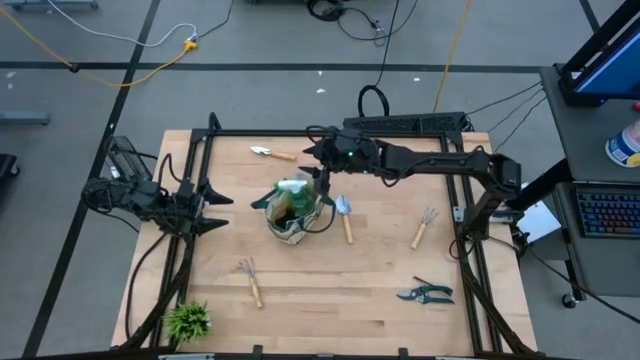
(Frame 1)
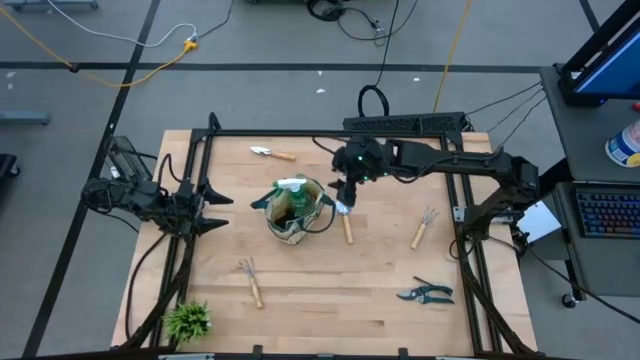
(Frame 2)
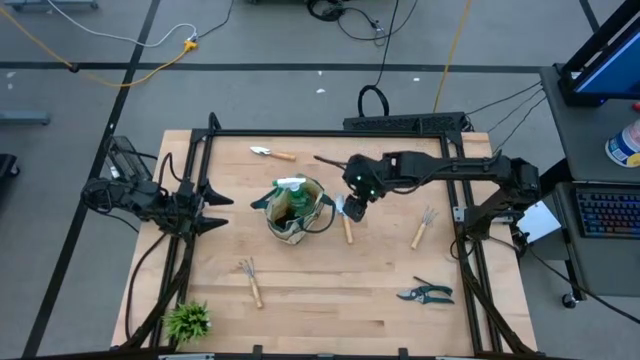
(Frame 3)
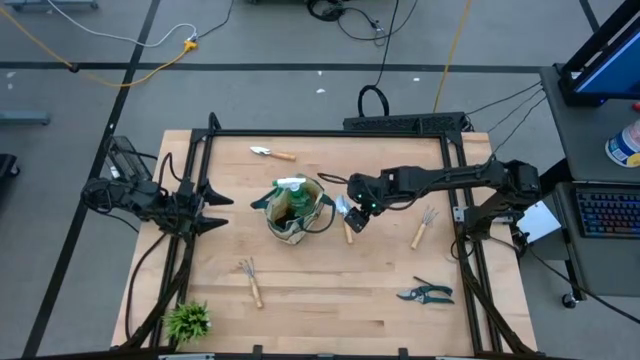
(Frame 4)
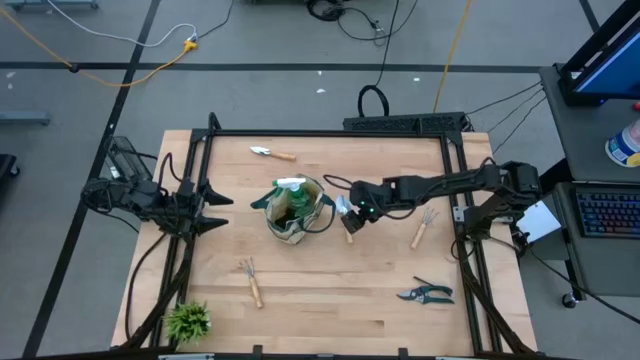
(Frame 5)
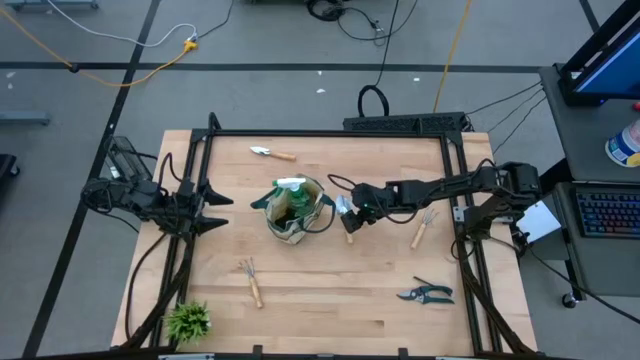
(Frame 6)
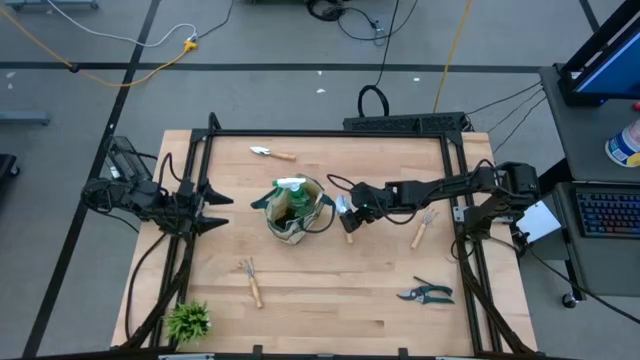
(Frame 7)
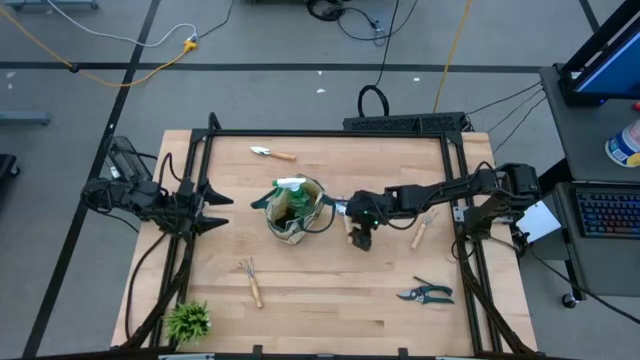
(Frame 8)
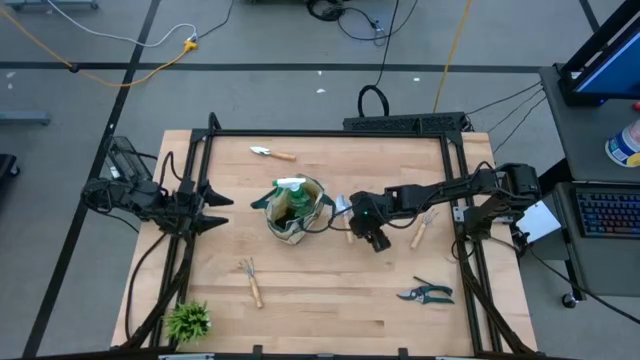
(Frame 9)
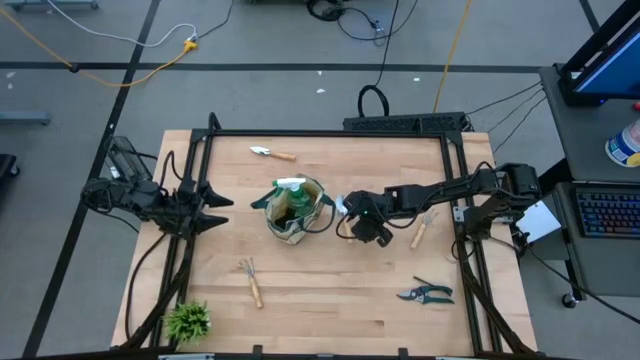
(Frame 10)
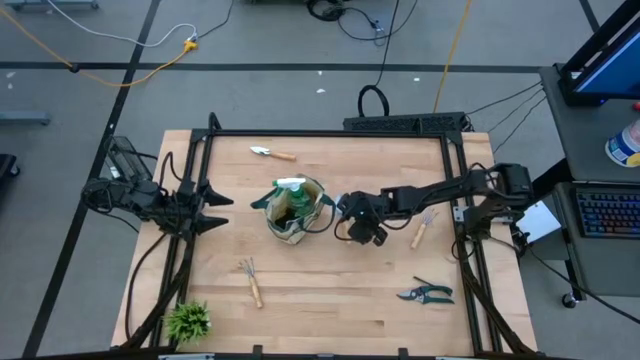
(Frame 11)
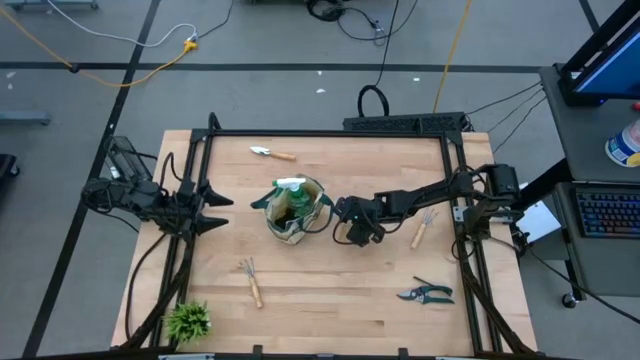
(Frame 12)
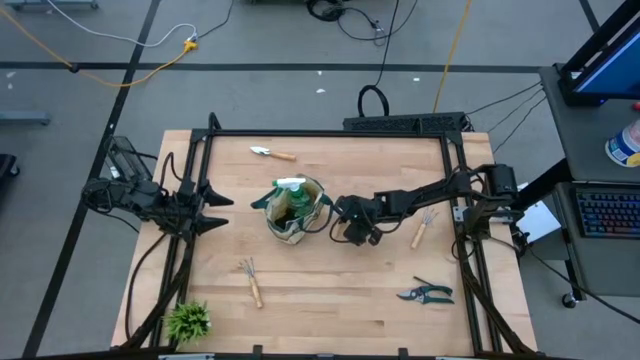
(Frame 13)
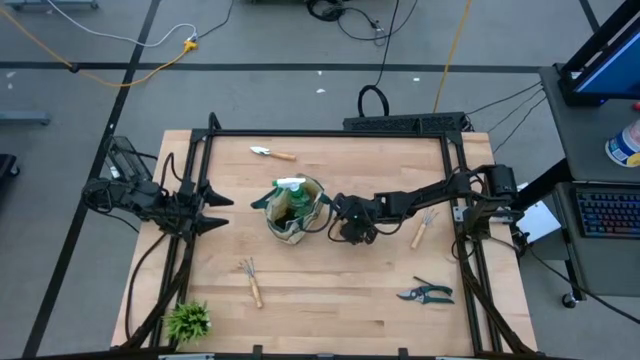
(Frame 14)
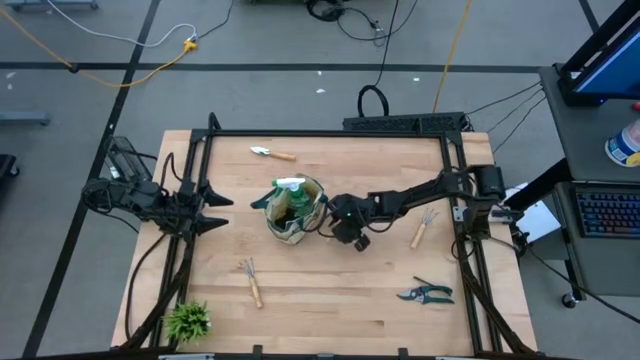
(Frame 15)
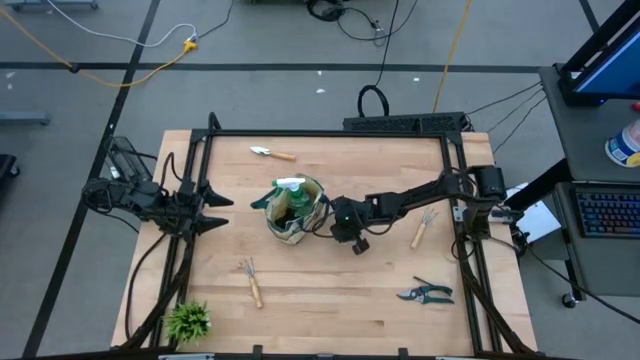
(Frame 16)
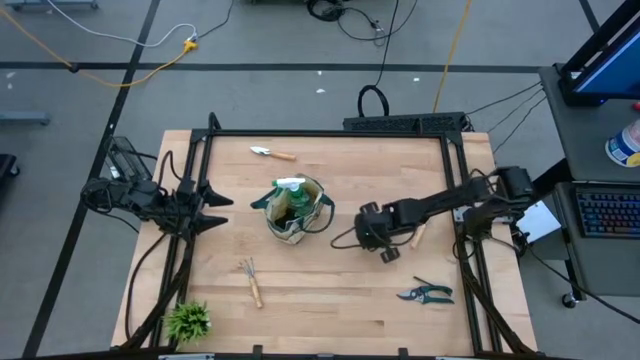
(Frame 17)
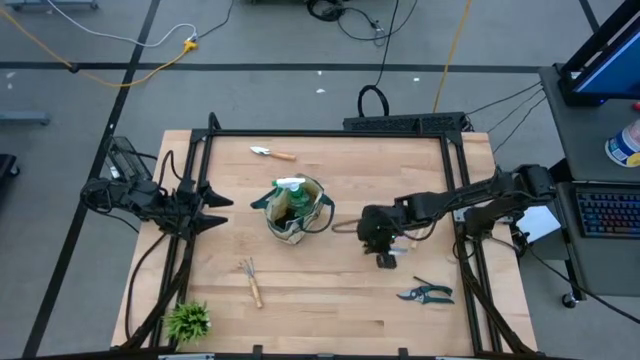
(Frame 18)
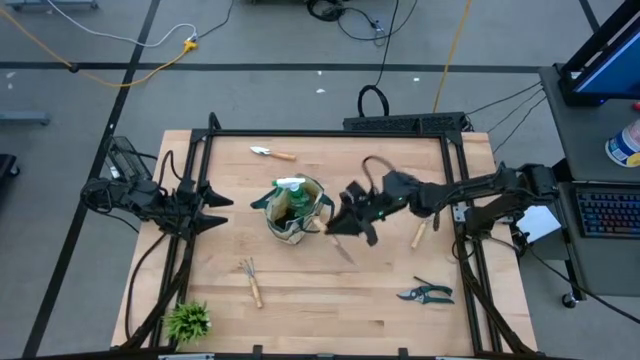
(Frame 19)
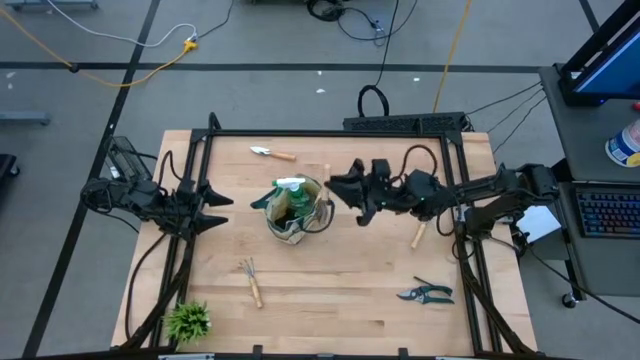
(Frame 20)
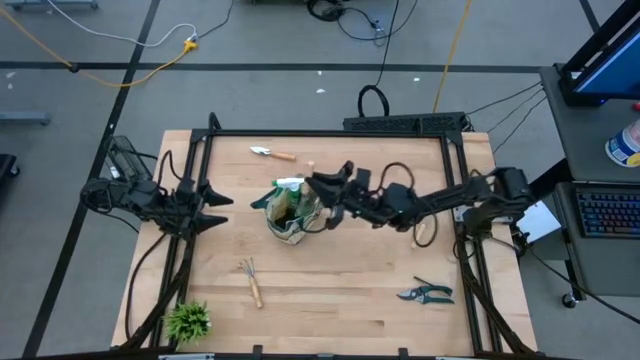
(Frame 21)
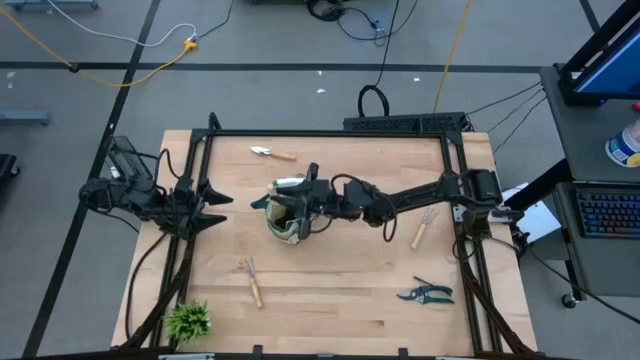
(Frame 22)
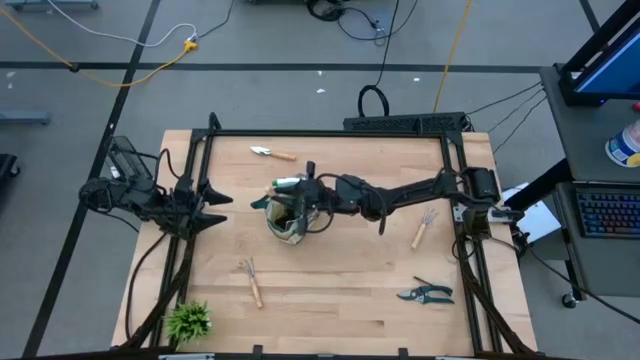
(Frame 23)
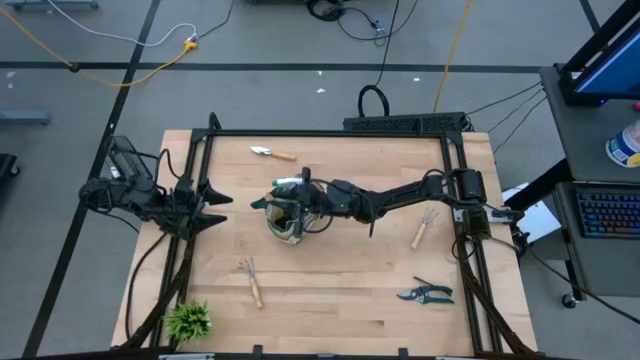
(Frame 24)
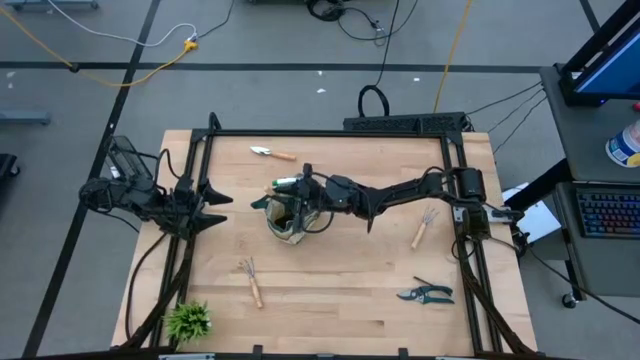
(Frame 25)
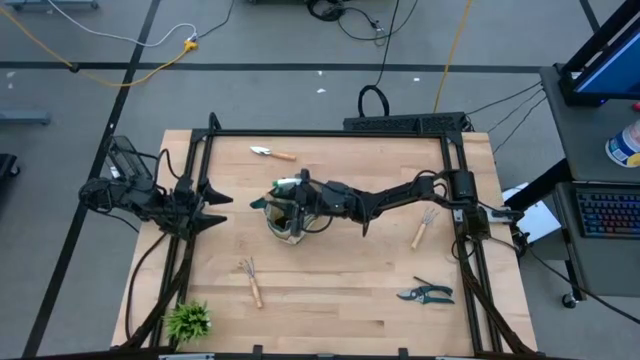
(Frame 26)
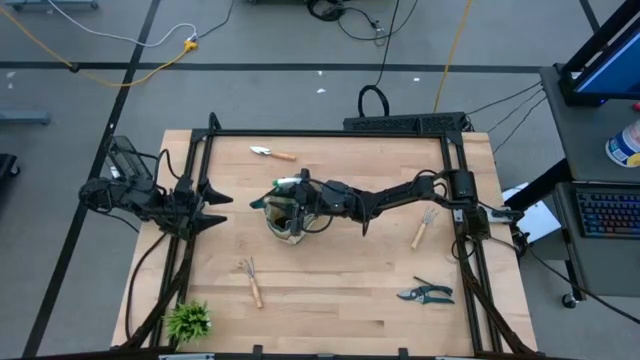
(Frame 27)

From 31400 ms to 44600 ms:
Task: Pick & Place Garden tools in Gardening bag
Put the brown bottom trowel into the green gardening bag

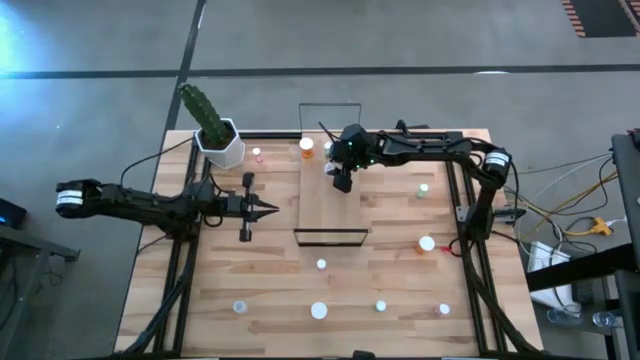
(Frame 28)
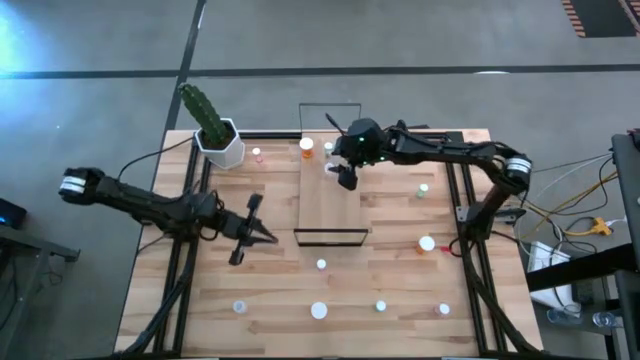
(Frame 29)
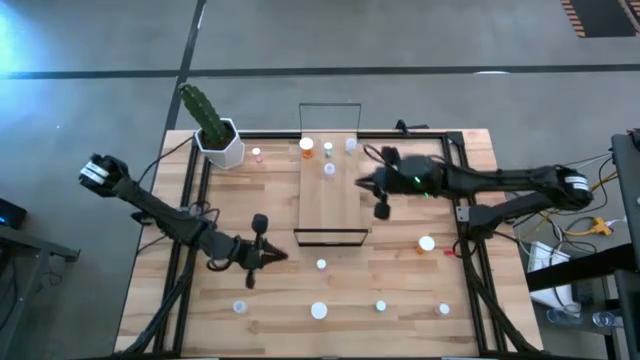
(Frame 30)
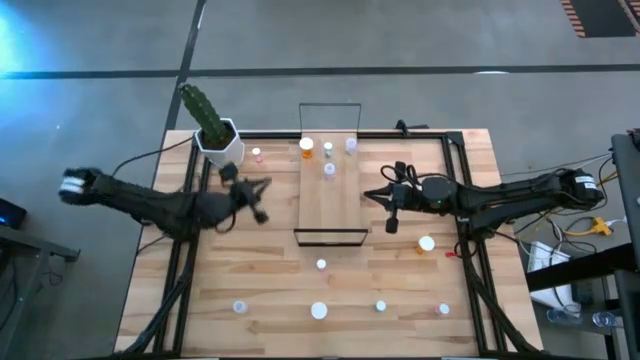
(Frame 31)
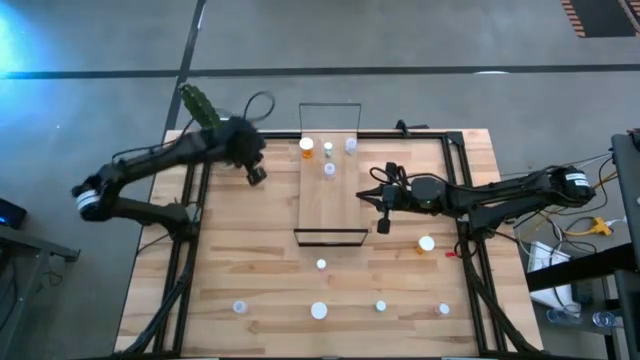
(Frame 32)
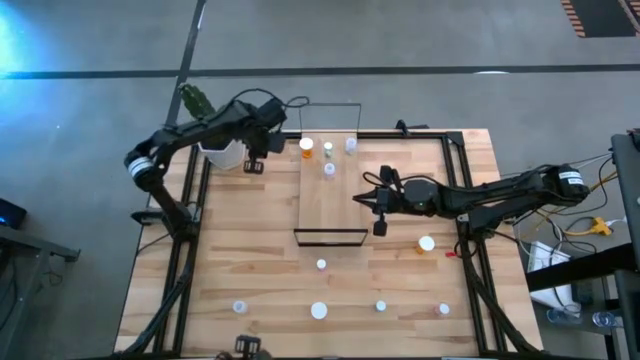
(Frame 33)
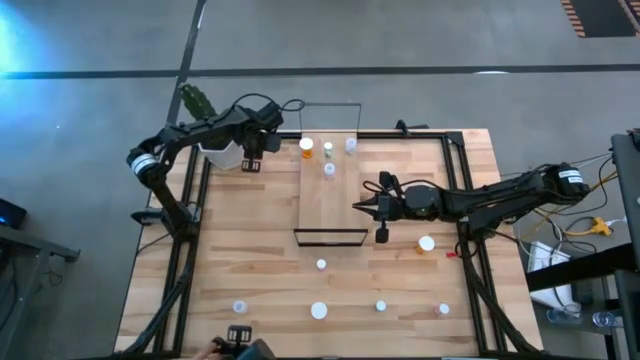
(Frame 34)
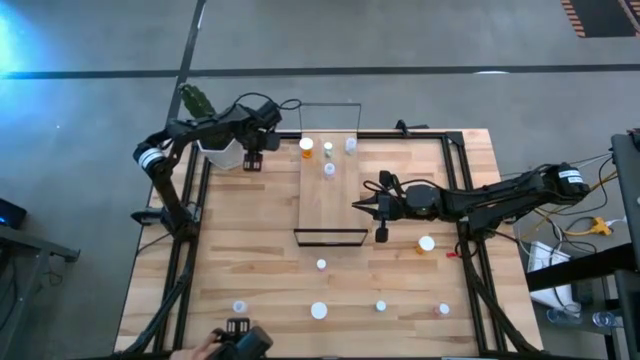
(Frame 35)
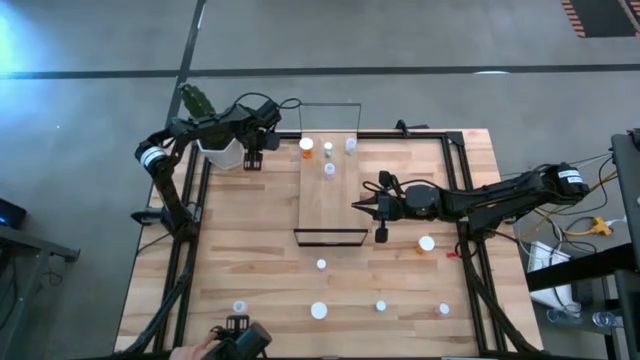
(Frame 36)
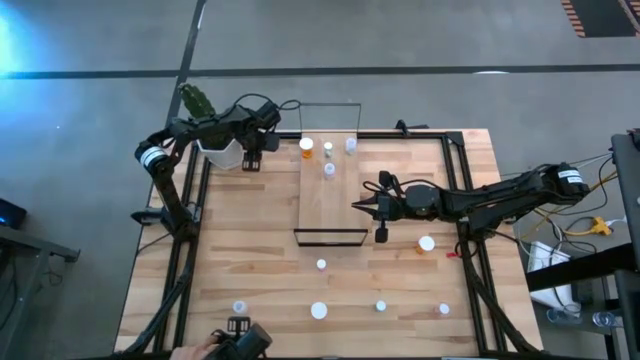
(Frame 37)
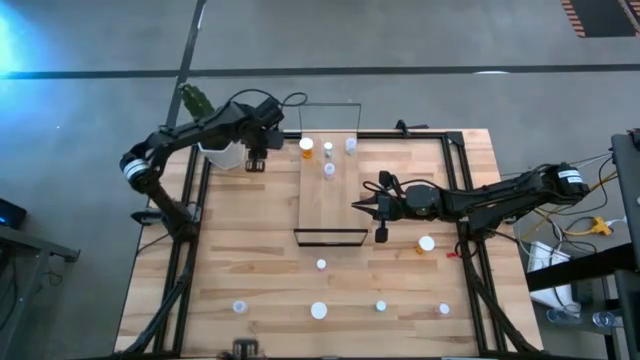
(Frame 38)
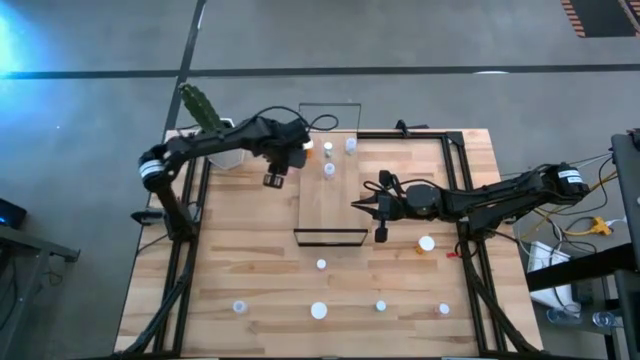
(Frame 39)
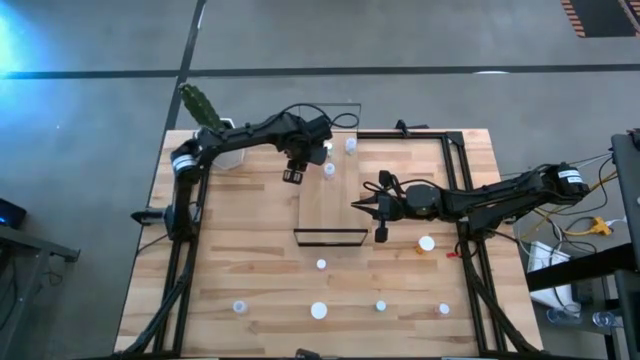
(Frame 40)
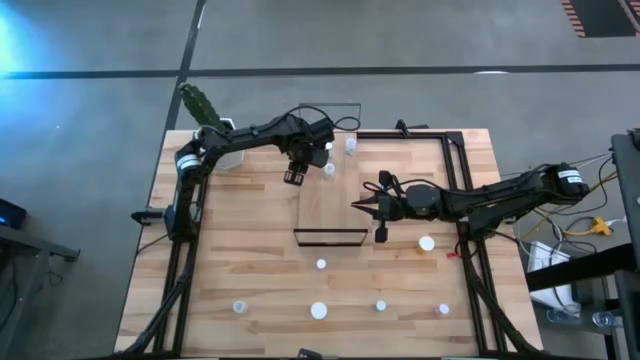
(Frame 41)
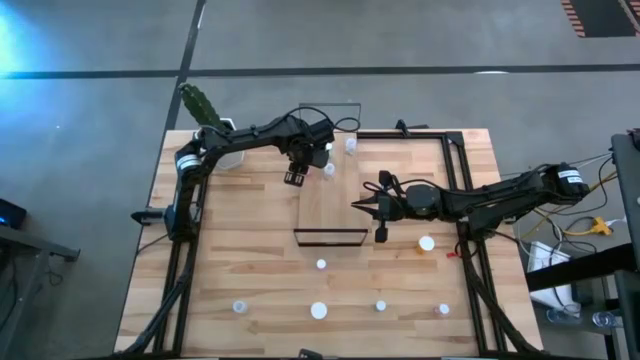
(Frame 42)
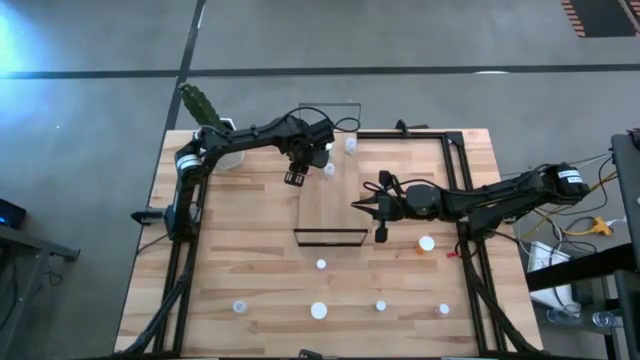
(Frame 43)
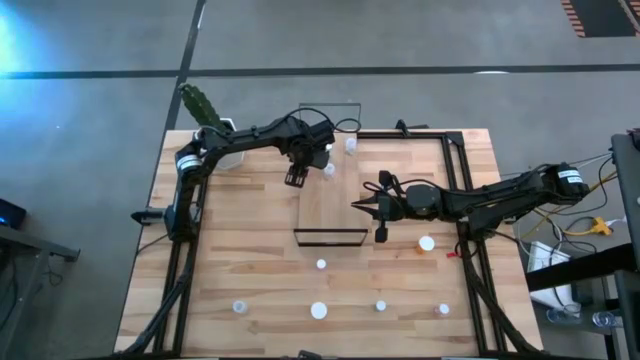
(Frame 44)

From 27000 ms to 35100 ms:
Task: Pick and place medicine bottles onto shelf by color
Put the top pink transparent pill bottle on the shelf
